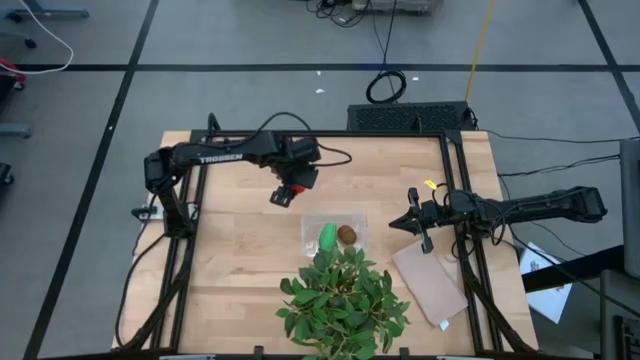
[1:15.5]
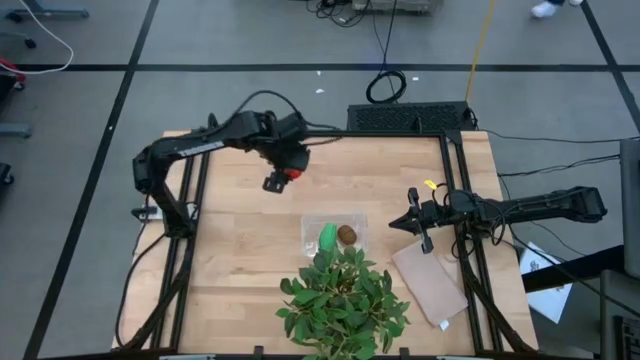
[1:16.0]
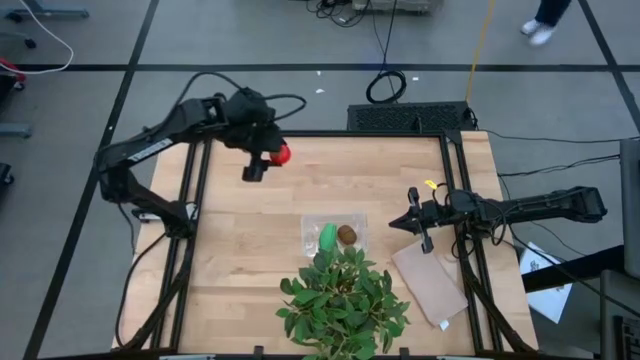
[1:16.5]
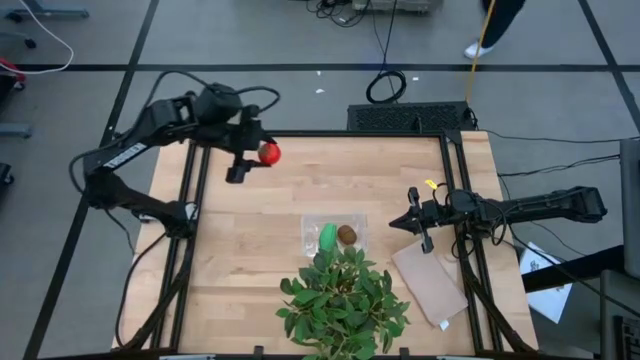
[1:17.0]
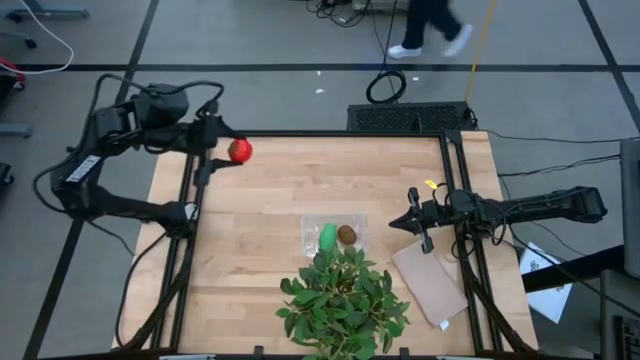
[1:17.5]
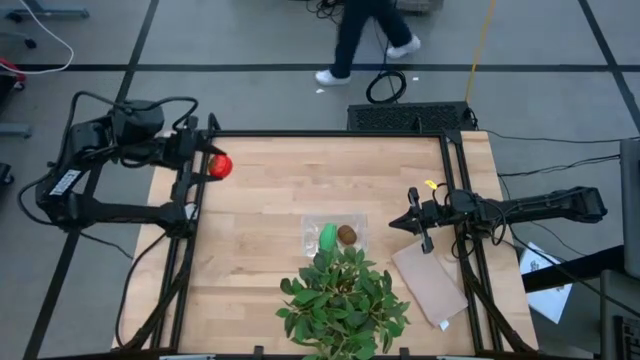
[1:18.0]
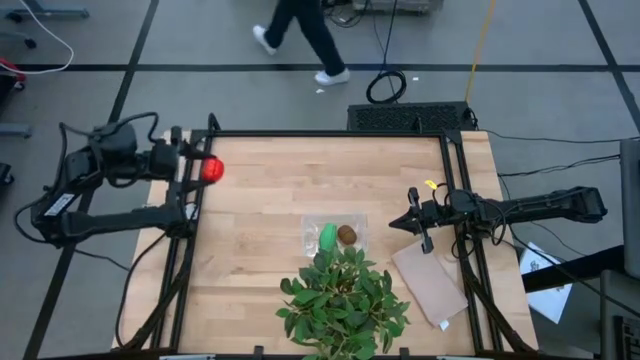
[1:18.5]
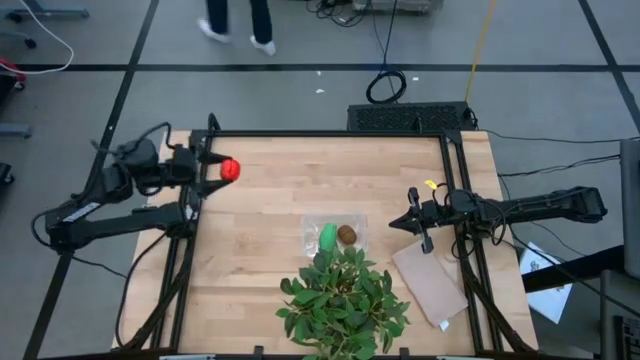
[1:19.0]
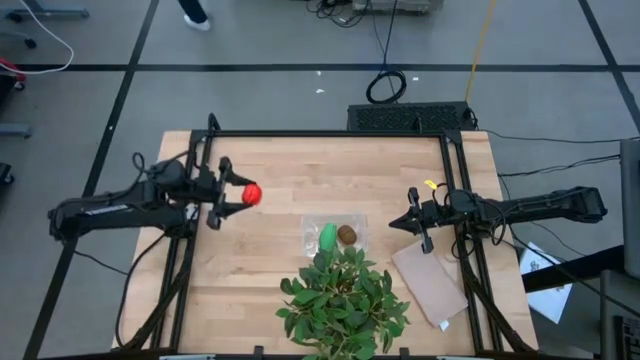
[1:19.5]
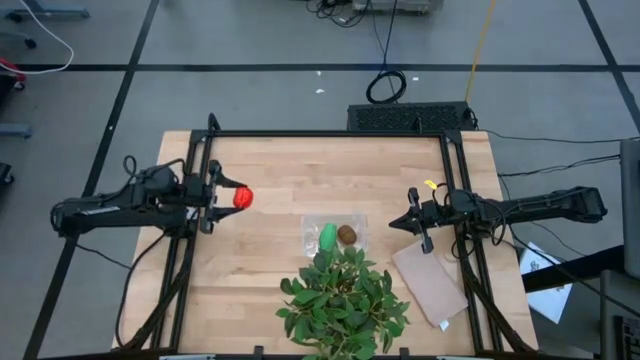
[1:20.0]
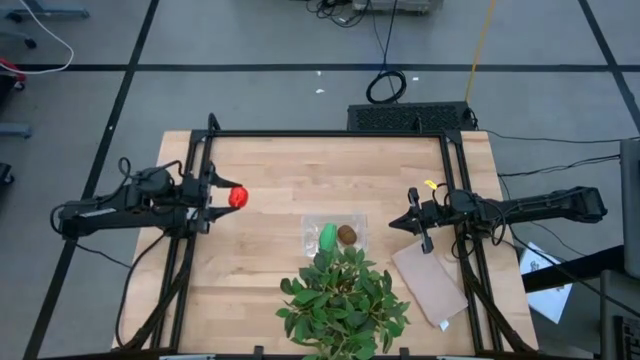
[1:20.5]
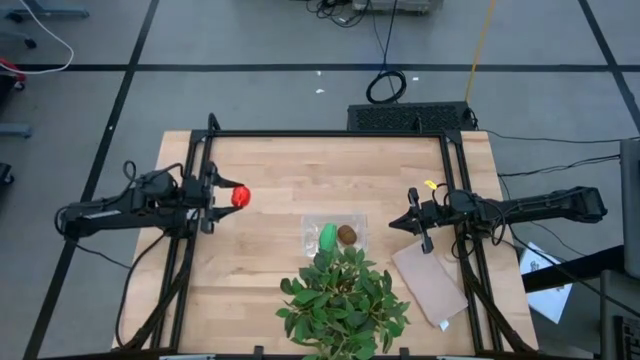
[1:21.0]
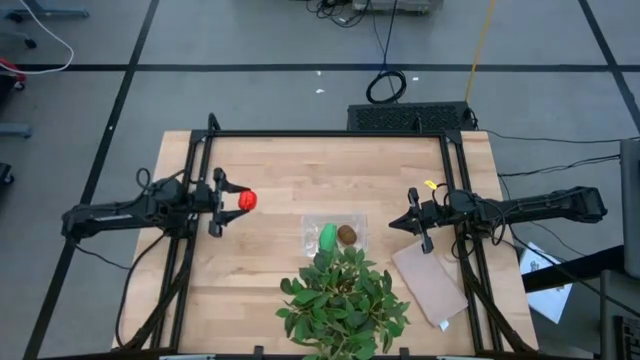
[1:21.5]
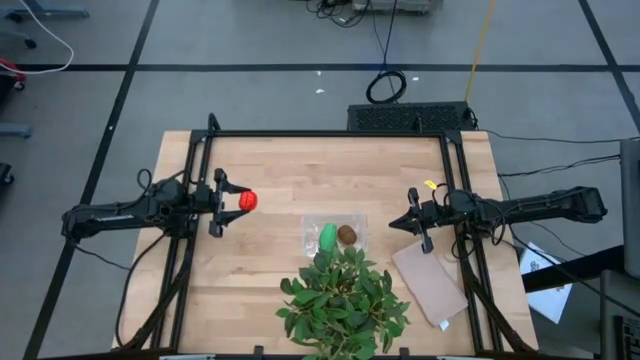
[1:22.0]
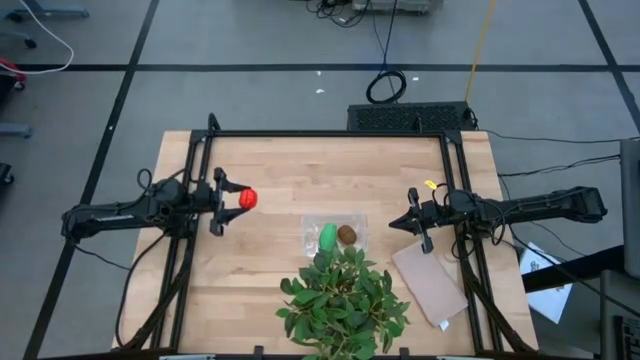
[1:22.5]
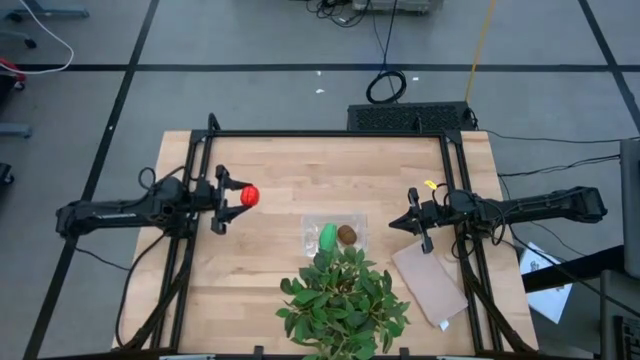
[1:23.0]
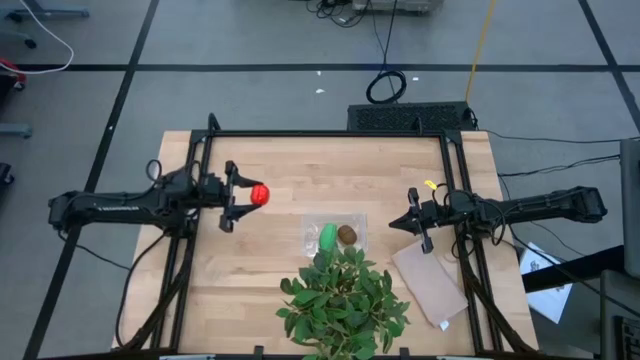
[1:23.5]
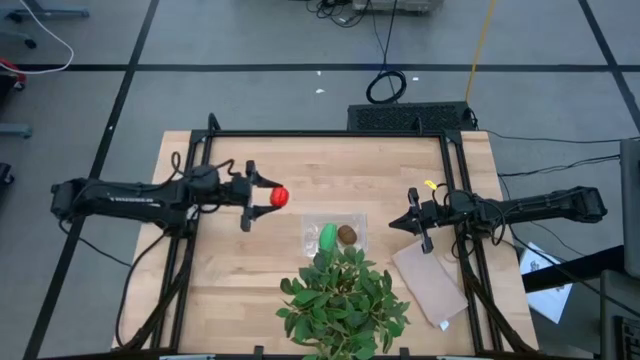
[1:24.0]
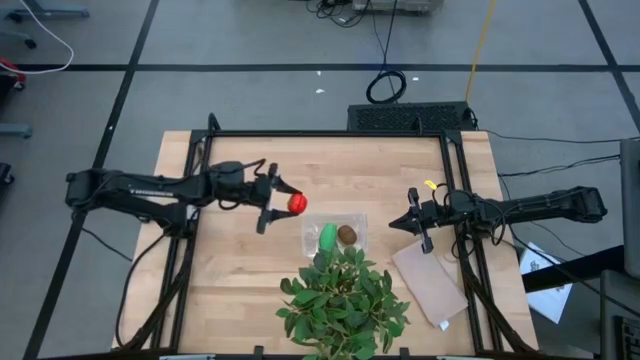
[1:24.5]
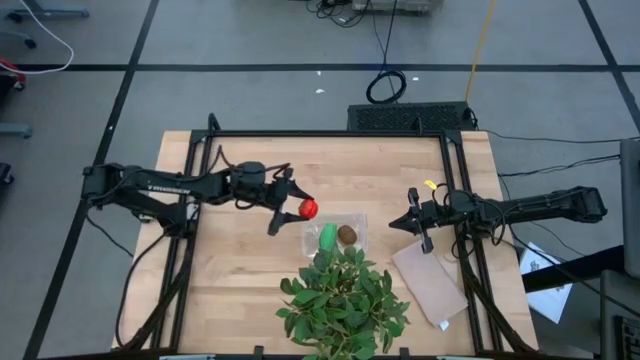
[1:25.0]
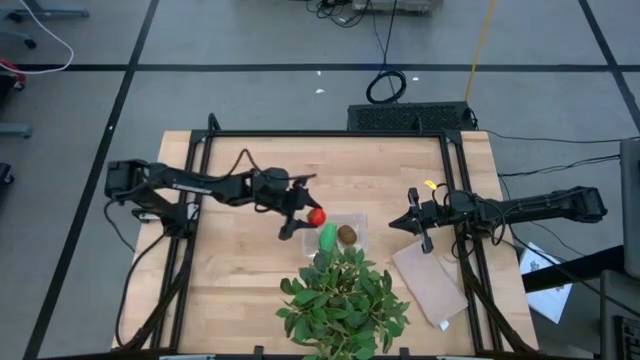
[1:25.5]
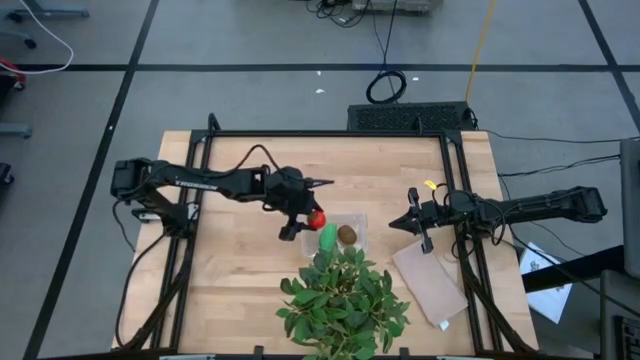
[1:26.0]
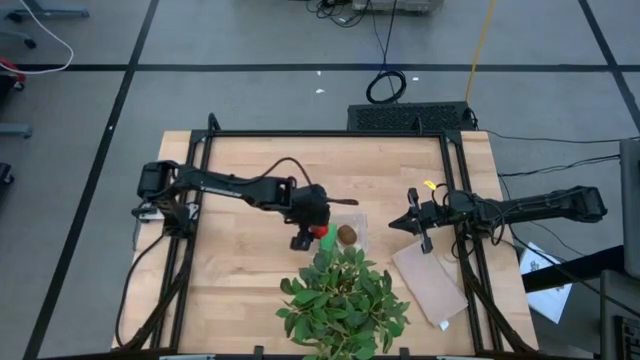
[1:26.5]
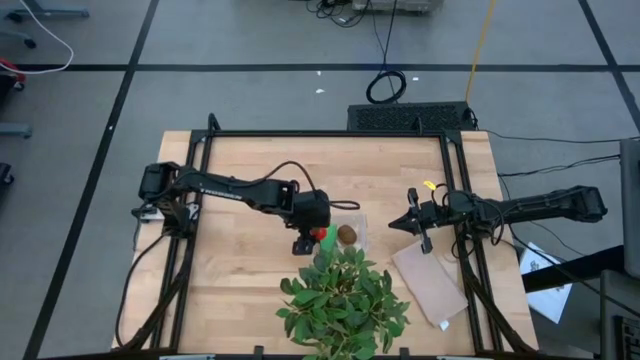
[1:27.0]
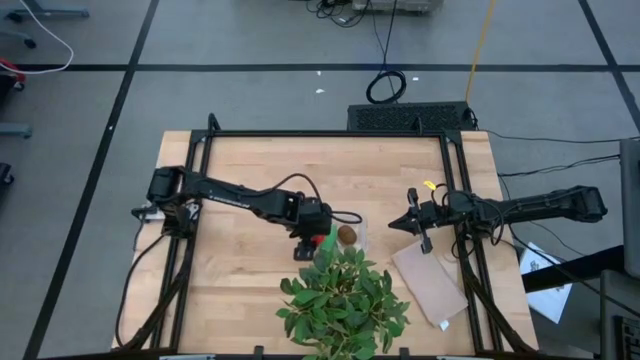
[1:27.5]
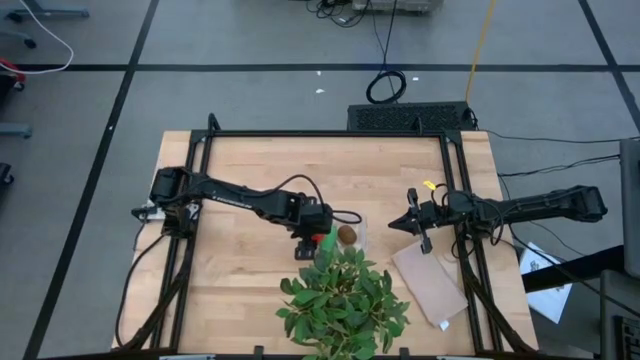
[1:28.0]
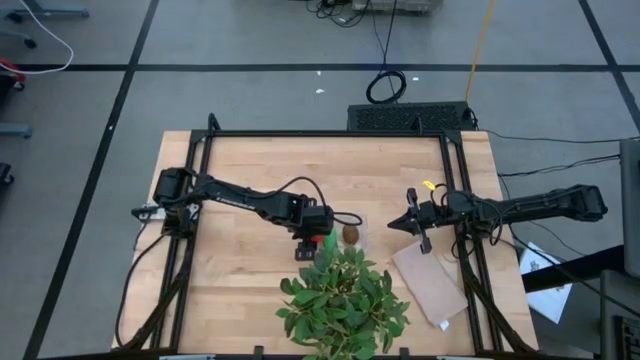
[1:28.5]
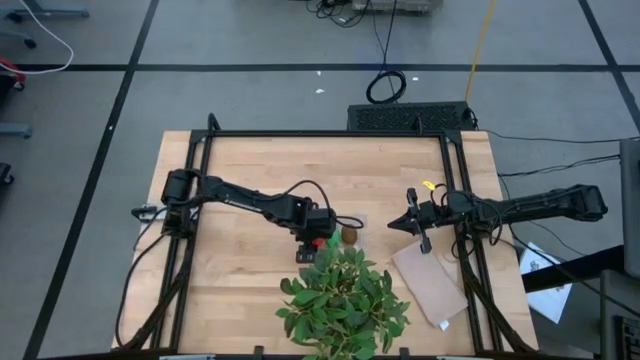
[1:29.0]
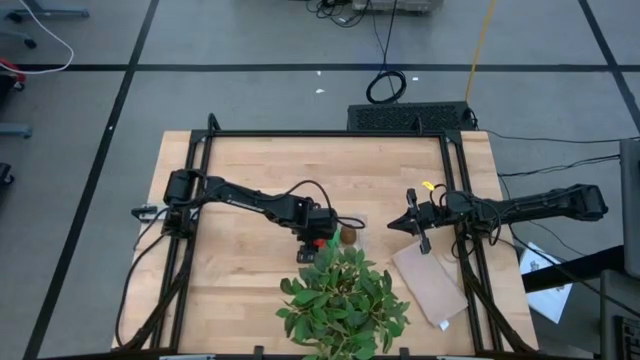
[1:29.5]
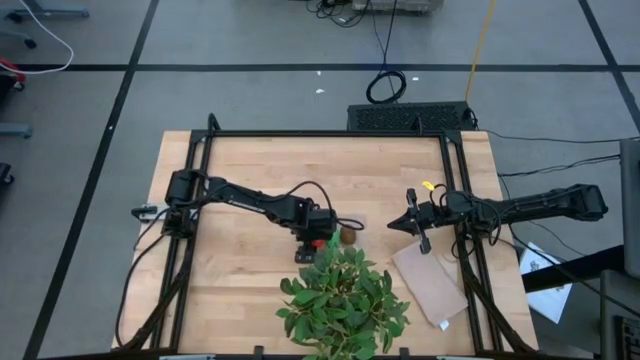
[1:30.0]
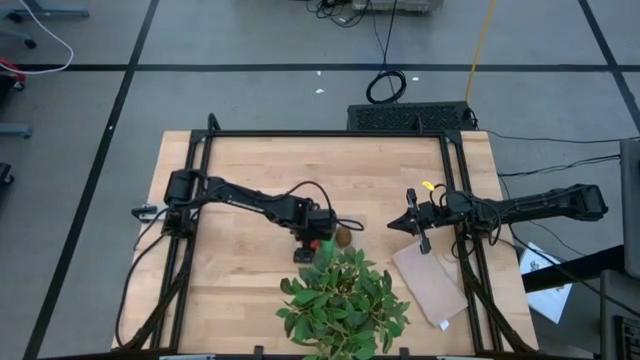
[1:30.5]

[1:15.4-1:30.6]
Task: Pick and placing Produce into tupperware
Put the orange tomato into the transparent bin

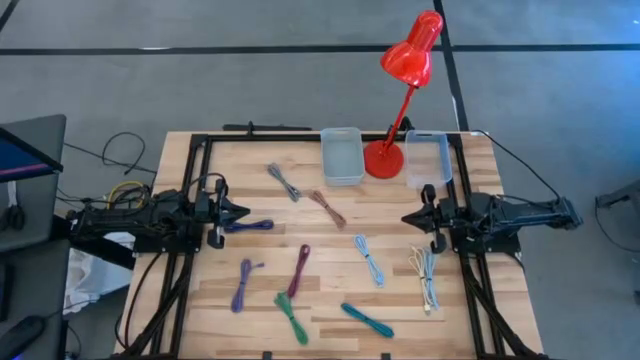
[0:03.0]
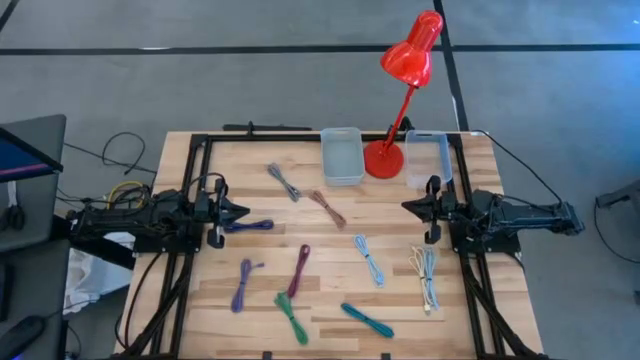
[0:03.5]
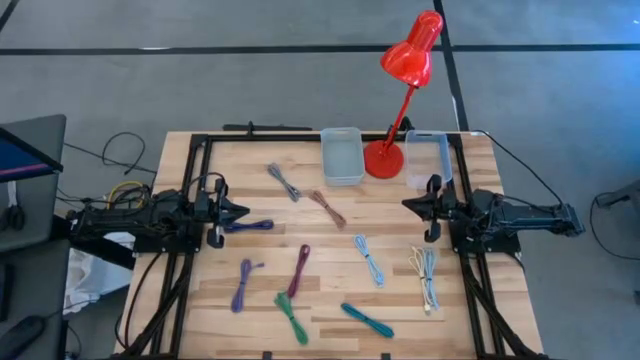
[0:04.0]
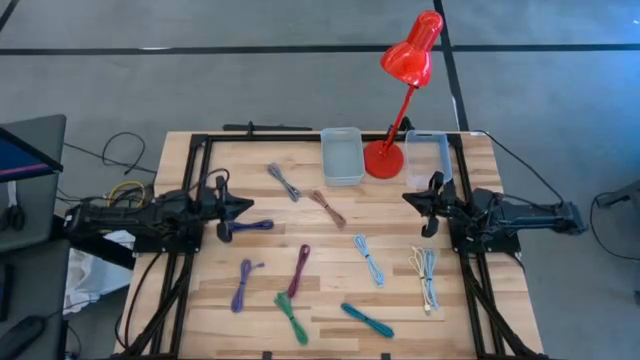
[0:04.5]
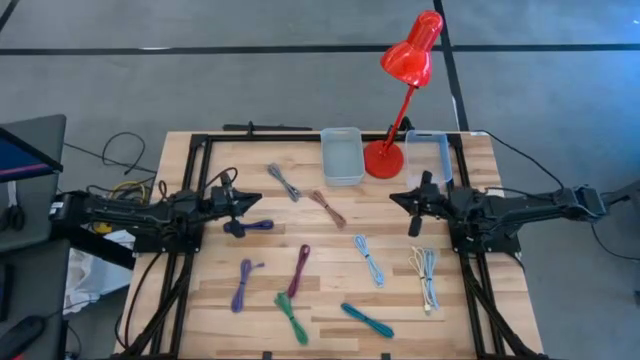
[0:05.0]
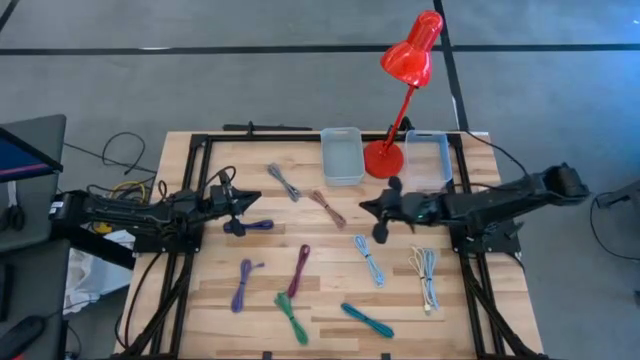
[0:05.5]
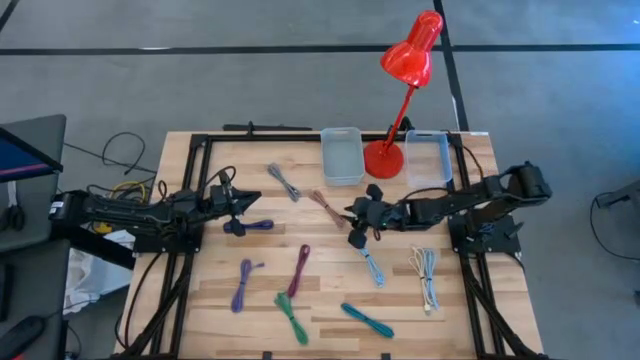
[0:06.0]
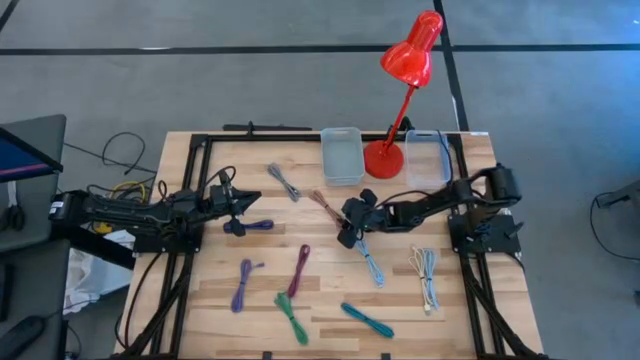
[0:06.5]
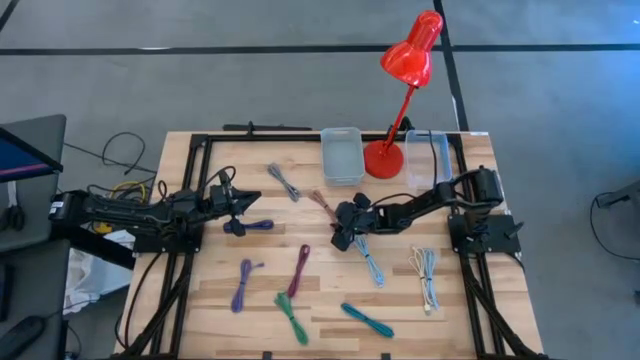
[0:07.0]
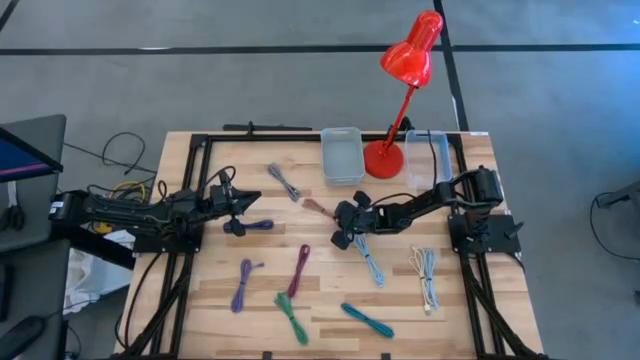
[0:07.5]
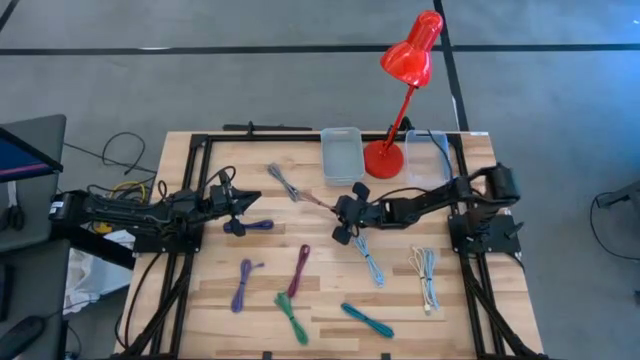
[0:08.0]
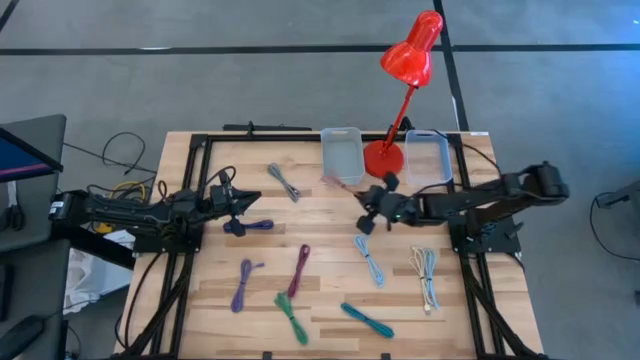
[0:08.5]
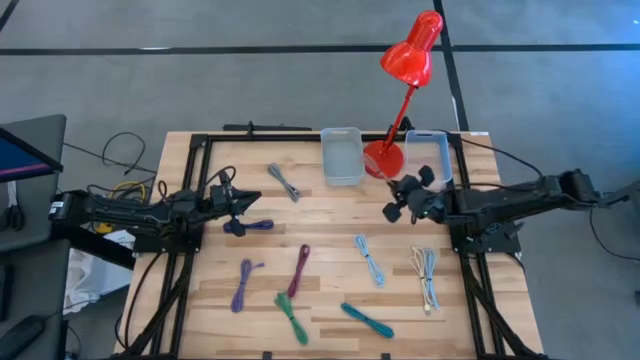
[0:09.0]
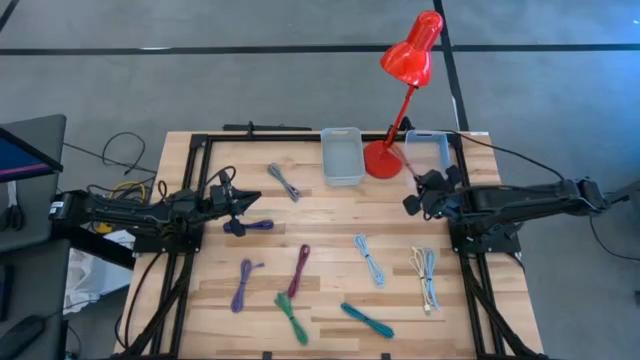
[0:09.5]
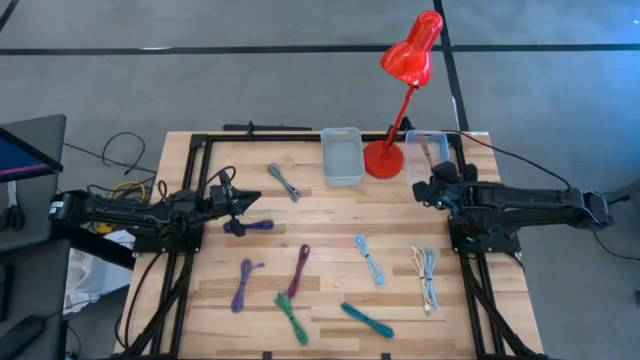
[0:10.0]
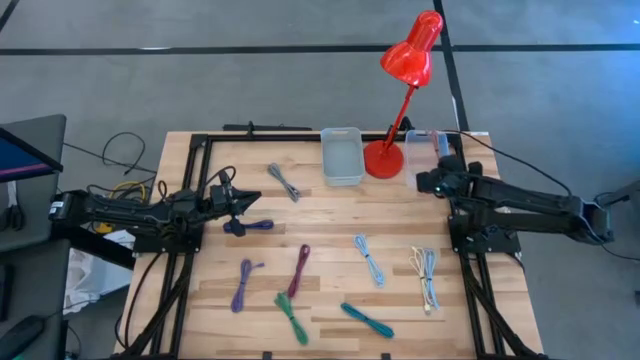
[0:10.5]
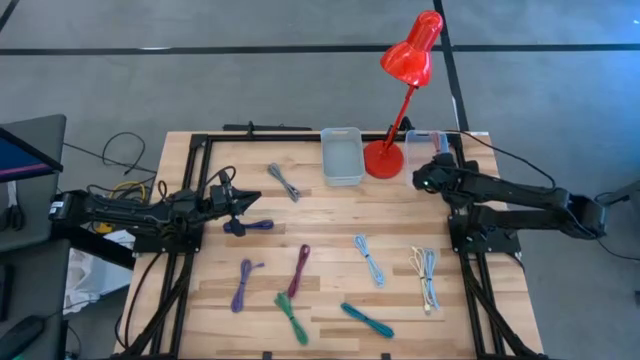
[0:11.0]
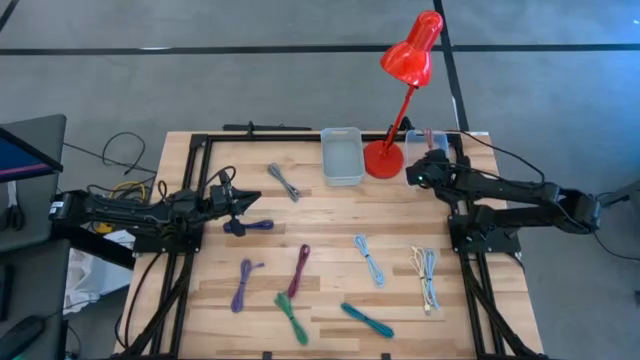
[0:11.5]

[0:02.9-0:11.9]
Task: Pick & Place USB Port
Put the pink charger cable into the transparent bin
